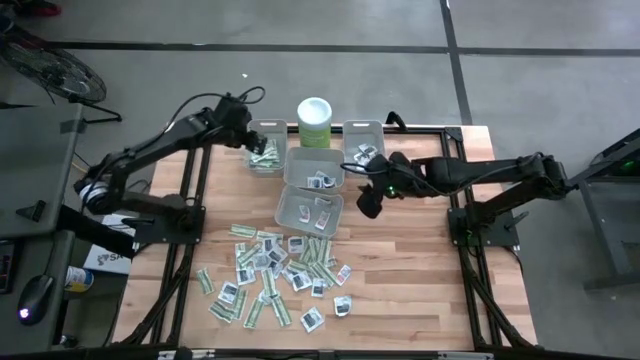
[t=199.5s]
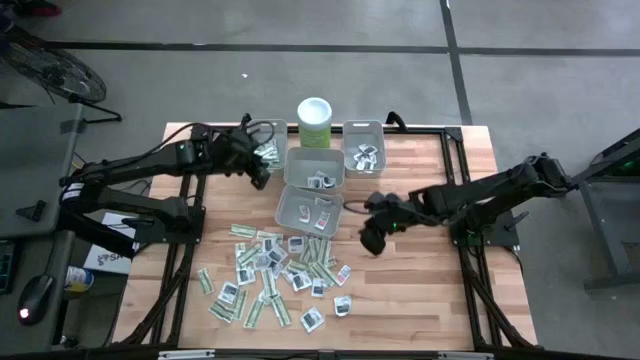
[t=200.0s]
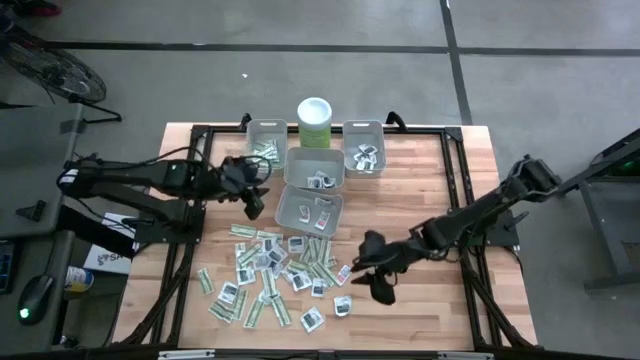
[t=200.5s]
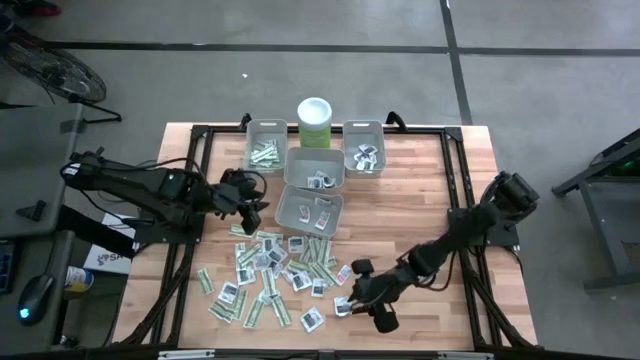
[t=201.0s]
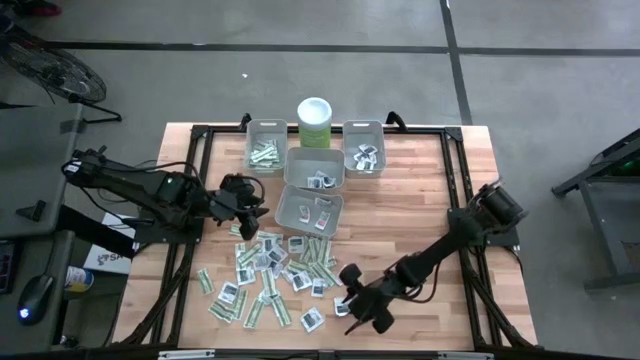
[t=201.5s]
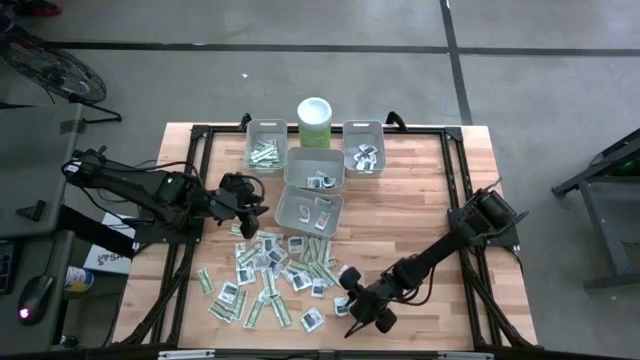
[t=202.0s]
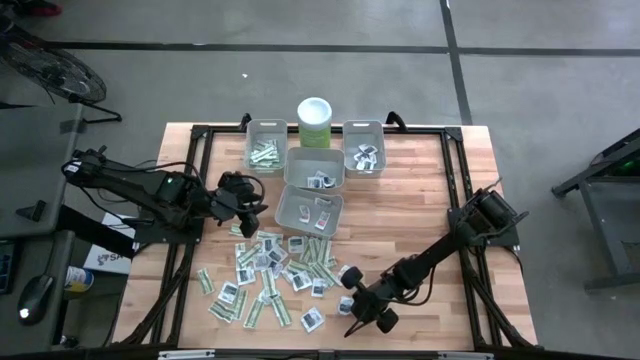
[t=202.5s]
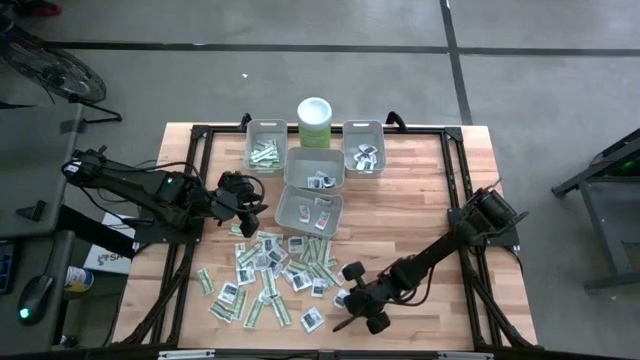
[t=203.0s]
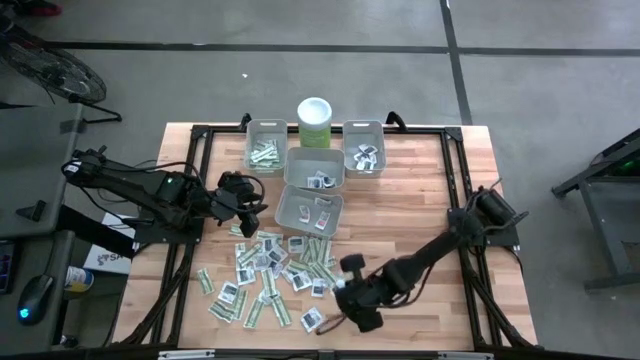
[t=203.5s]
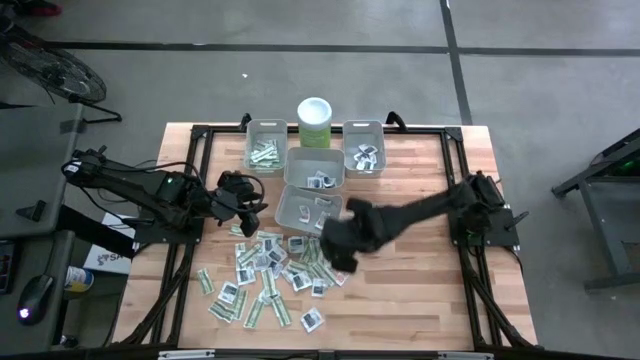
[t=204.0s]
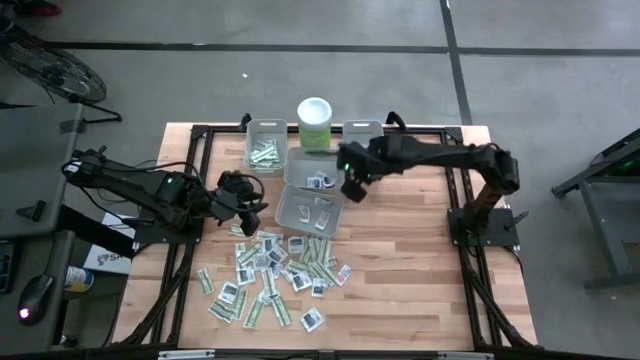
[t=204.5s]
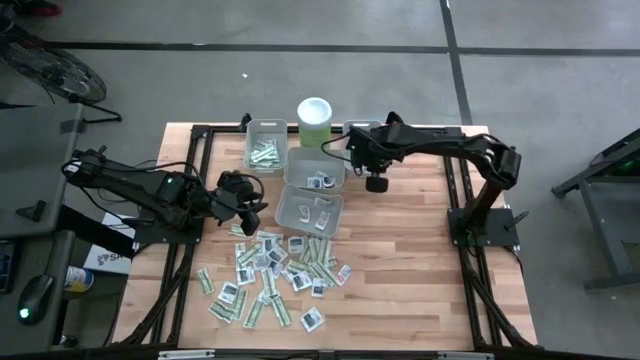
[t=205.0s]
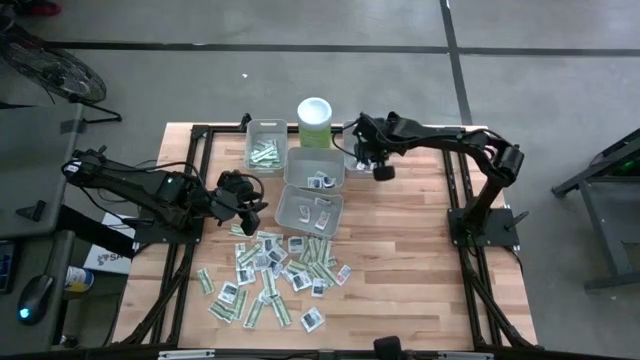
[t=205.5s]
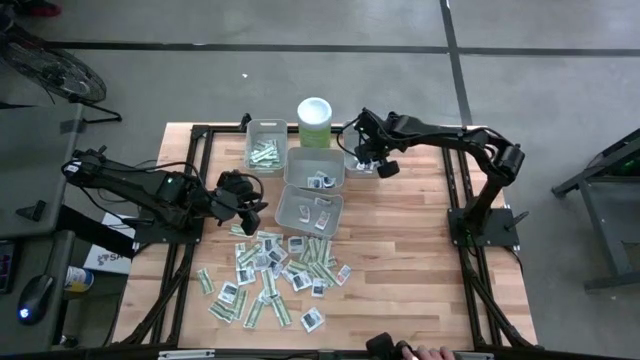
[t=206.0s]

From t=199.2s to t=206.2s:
Task: Pick & Place First Aid Supplies
Put the towelette pack into the right bin

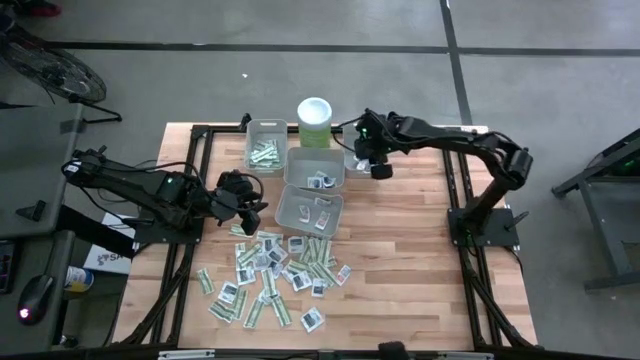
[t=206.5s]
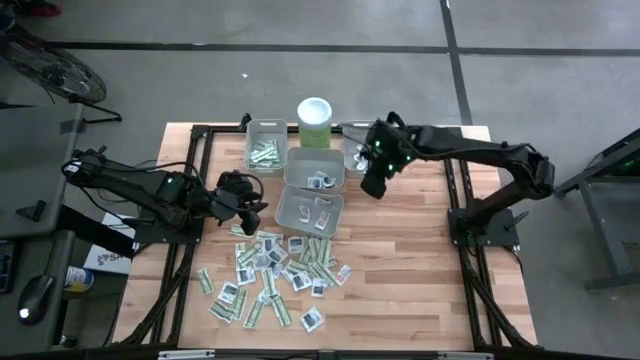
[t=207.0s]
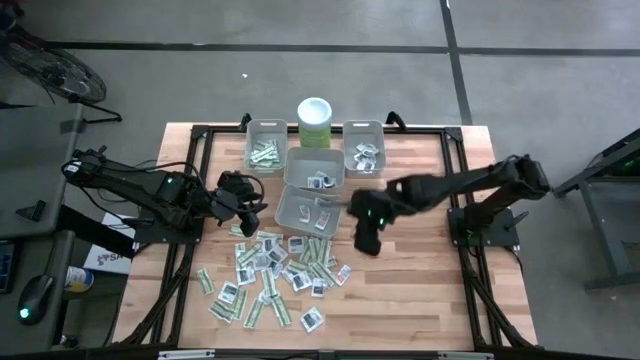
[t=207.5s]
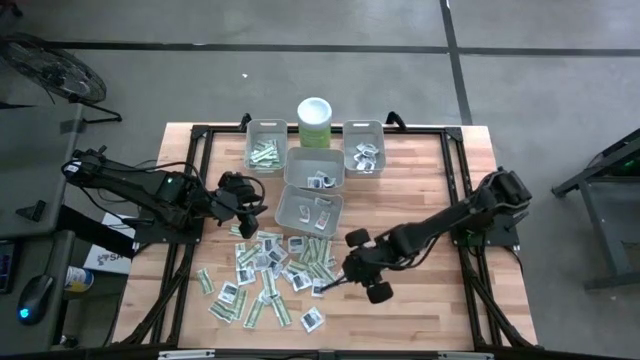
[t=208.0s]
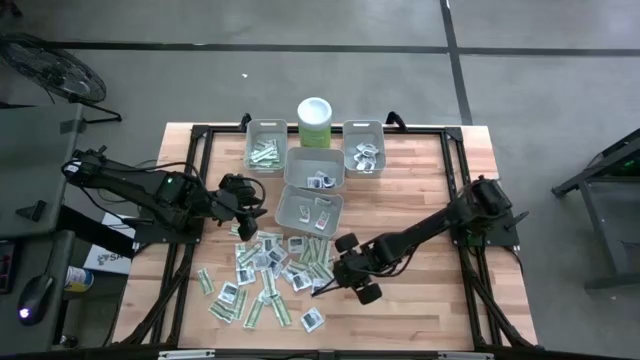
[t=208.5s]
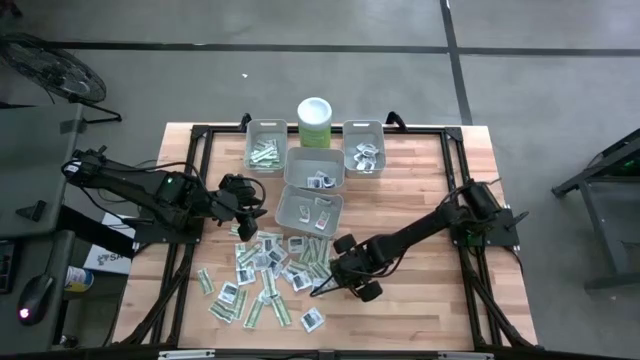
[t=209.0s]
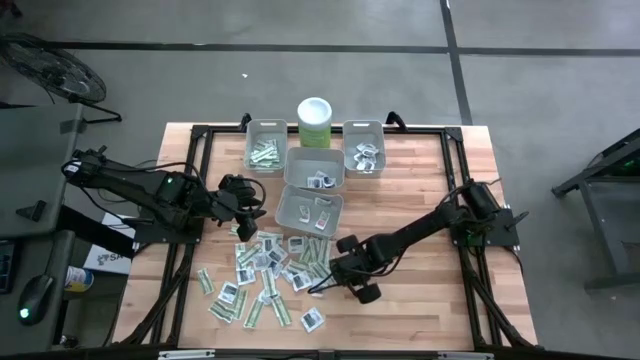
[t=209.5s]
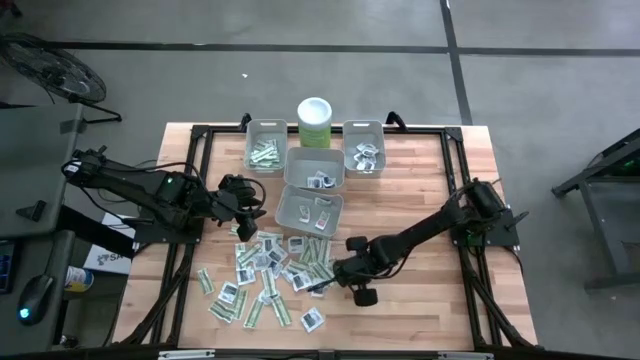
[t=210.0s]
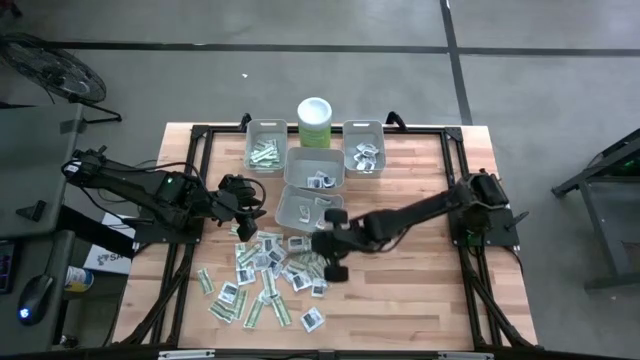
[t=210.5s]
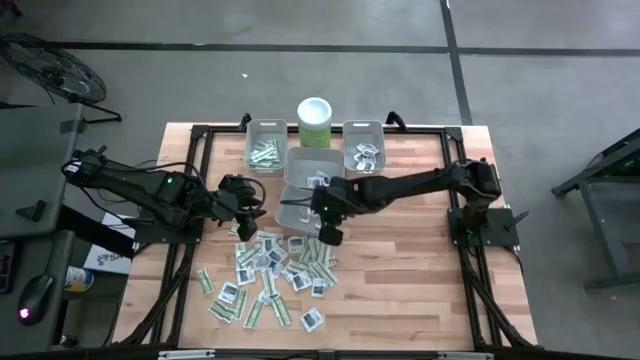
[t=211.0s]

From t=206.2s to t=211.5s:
Put the right ointment pack into the bottom center bin

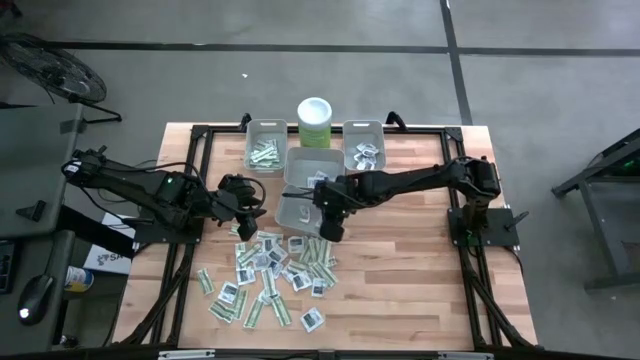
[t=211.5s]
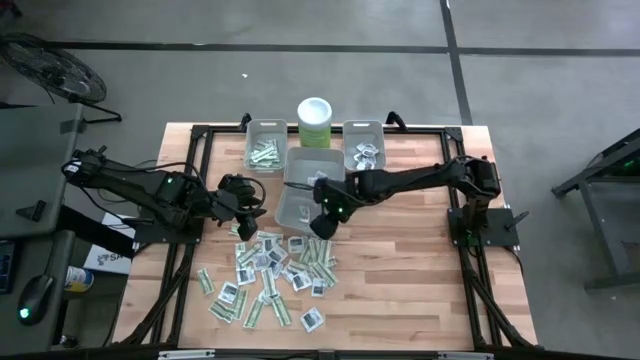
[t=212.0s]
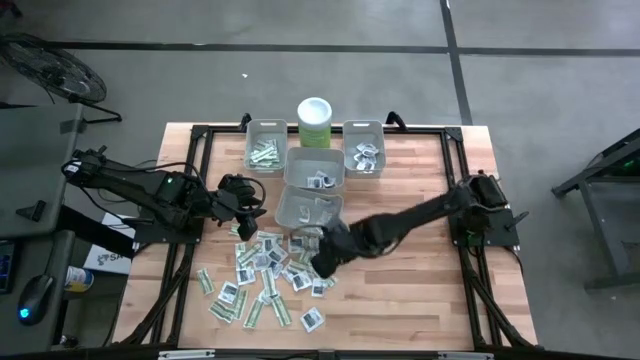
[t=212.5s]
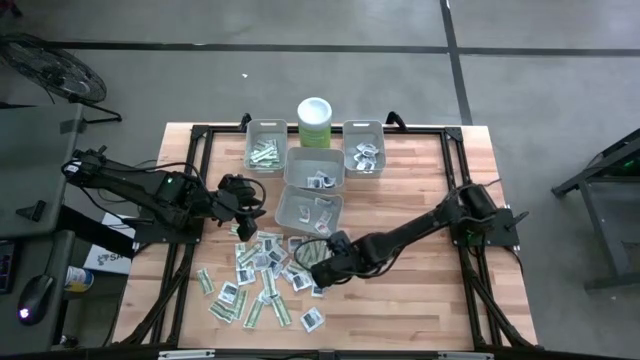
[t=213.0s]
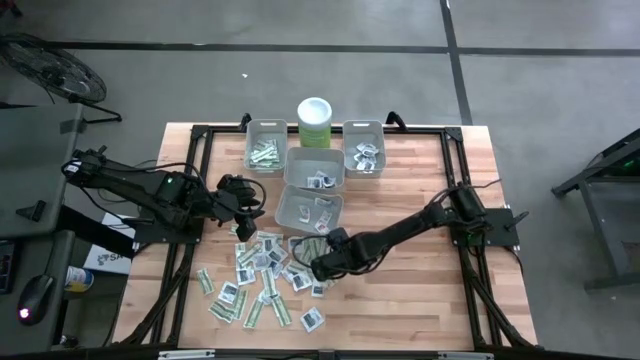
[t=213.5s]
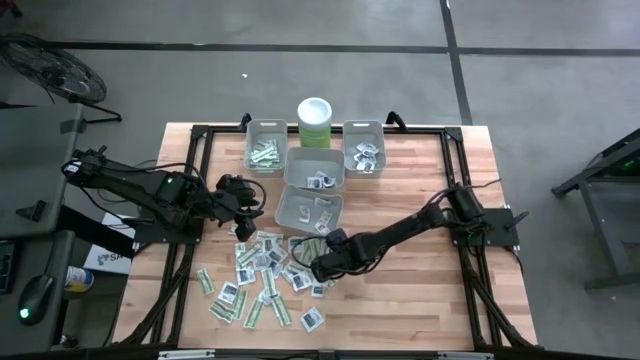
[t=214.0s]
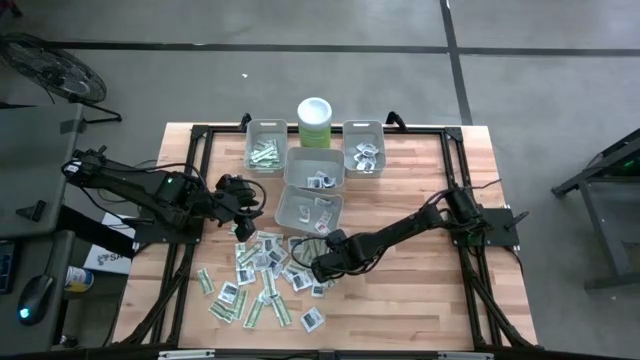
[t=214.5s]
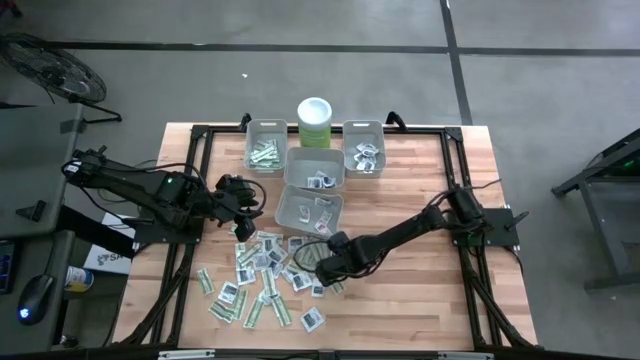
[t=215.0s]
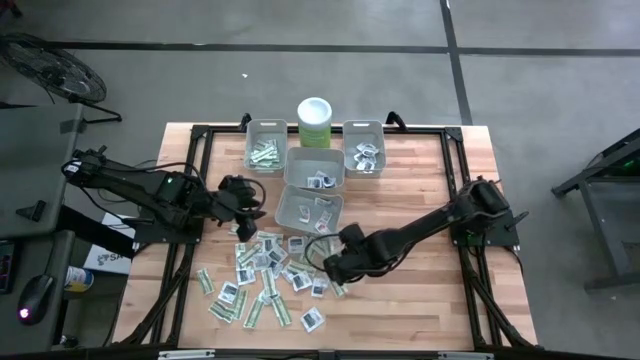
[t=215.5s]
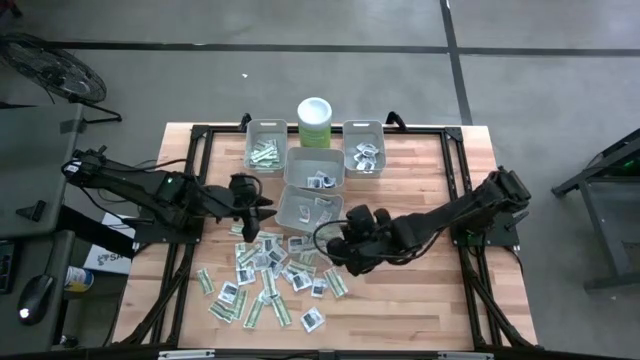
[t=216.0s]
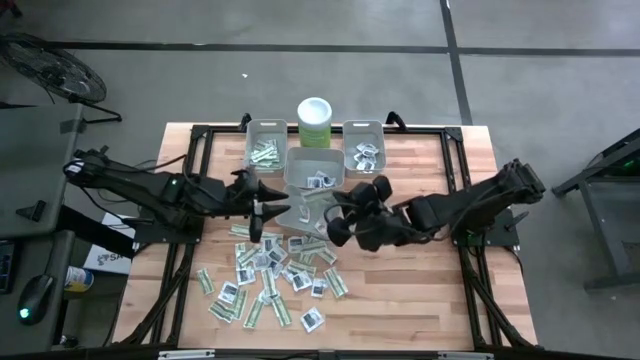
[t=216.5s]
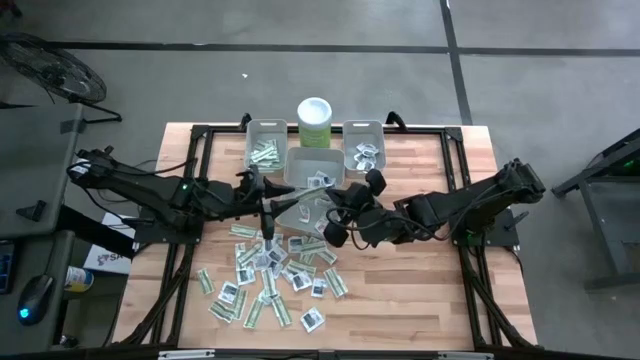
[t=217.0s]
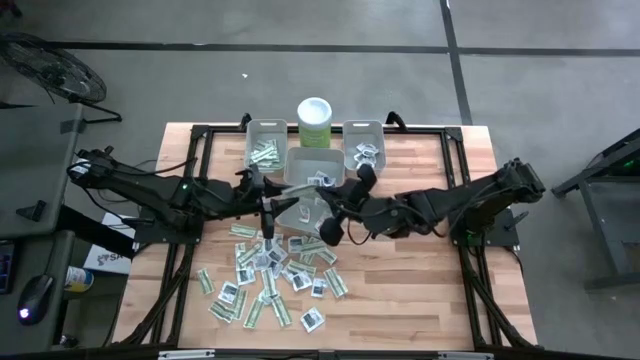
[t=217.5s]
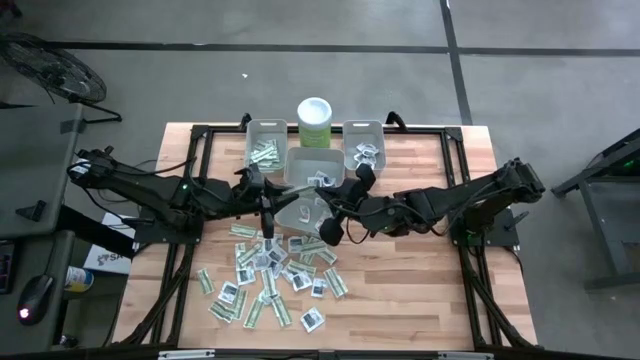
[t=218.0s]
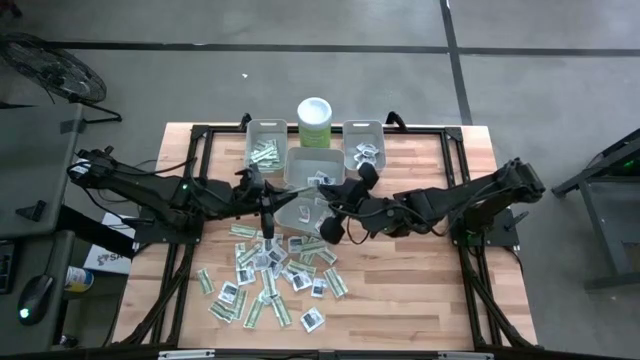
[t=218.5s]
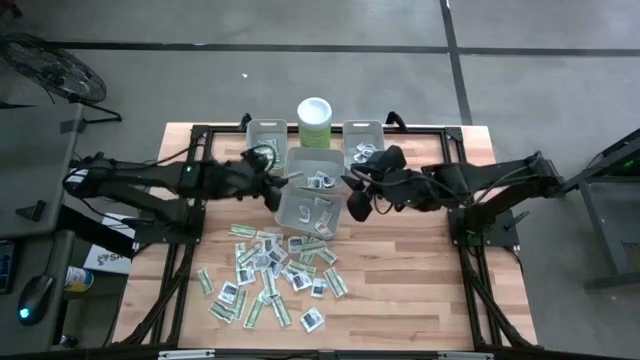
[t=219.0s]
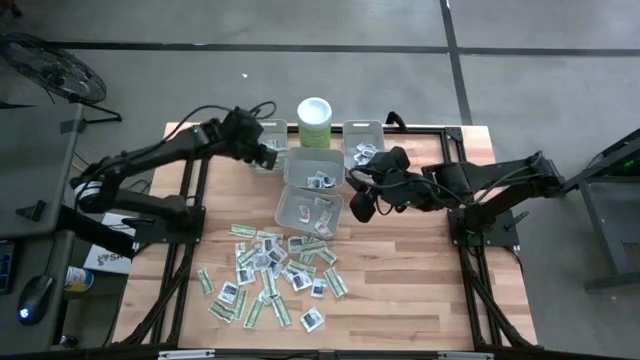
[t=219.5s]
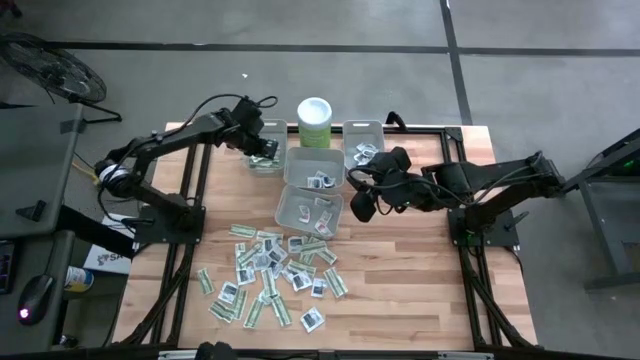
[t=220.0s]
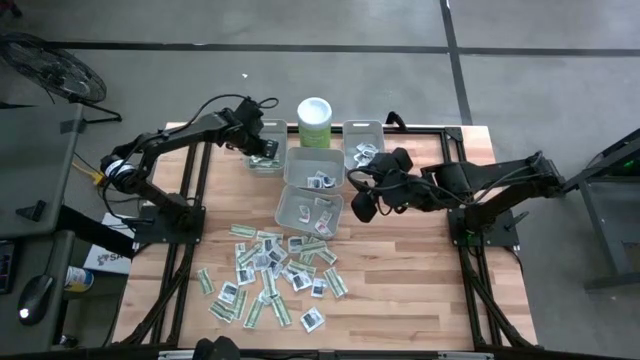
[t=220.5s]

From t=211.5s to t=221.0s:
Put the bandage pack into the left bin
